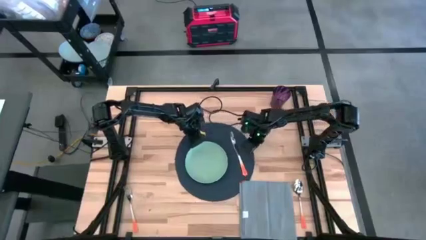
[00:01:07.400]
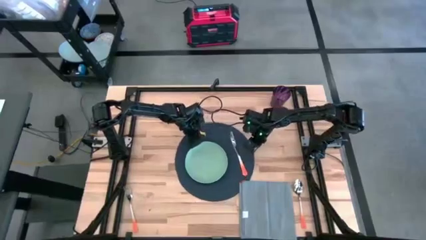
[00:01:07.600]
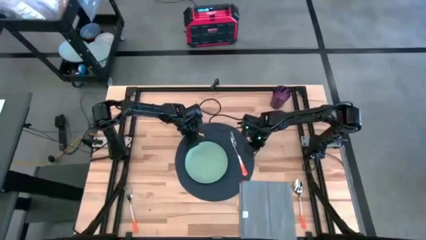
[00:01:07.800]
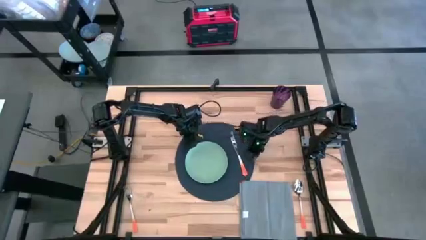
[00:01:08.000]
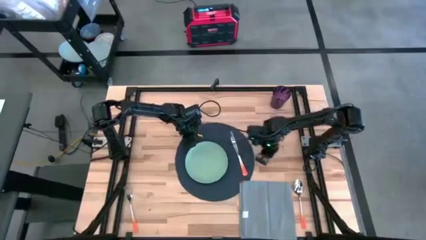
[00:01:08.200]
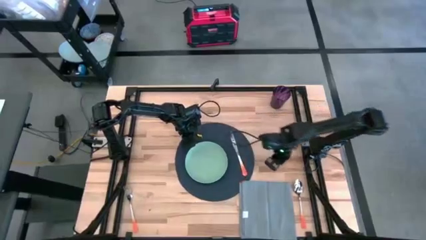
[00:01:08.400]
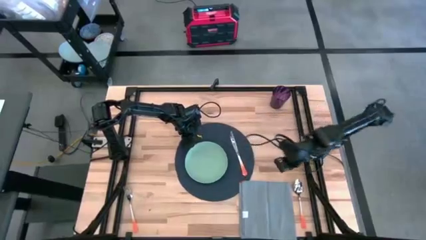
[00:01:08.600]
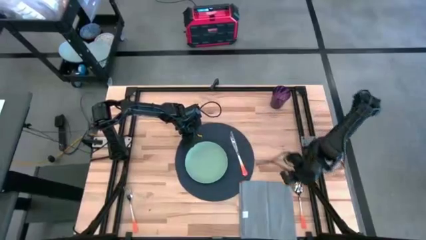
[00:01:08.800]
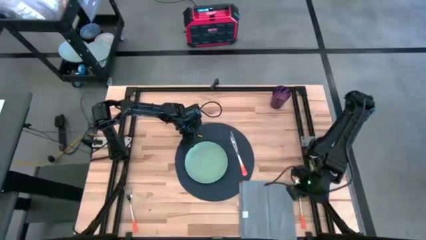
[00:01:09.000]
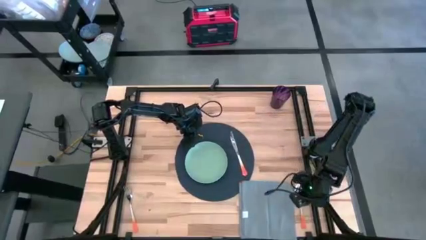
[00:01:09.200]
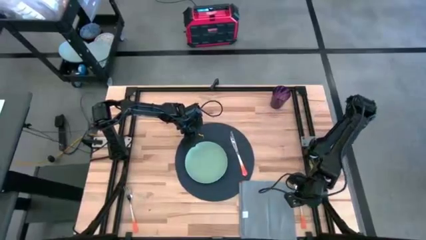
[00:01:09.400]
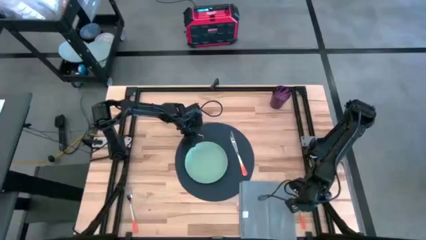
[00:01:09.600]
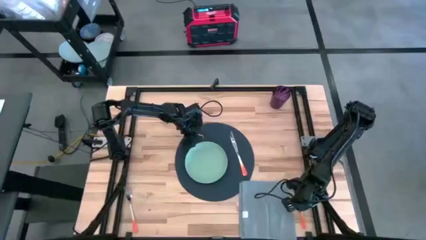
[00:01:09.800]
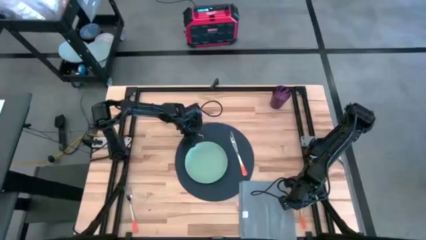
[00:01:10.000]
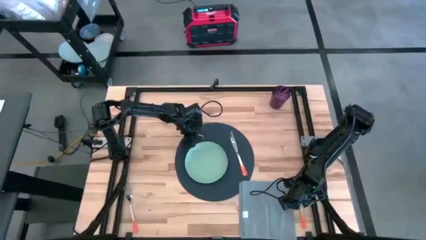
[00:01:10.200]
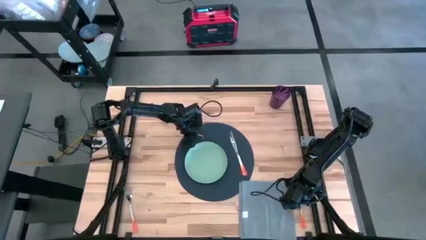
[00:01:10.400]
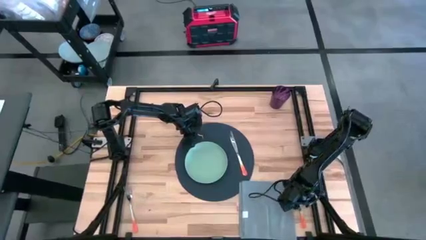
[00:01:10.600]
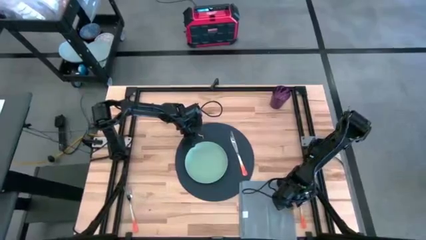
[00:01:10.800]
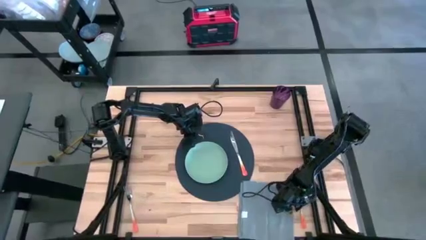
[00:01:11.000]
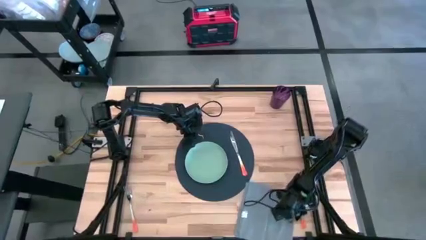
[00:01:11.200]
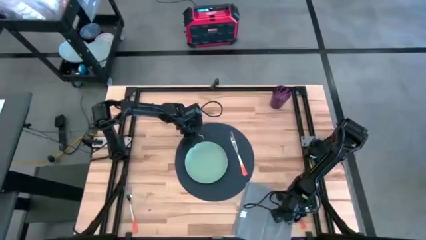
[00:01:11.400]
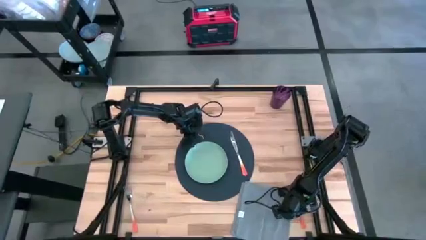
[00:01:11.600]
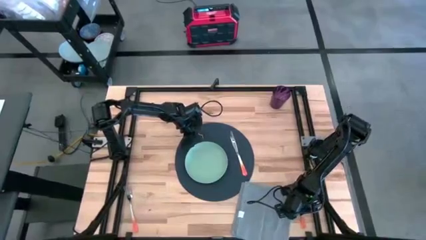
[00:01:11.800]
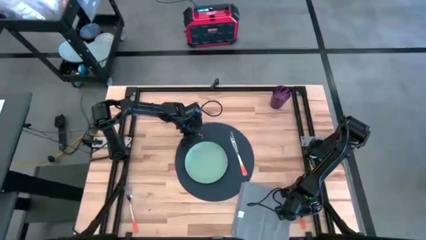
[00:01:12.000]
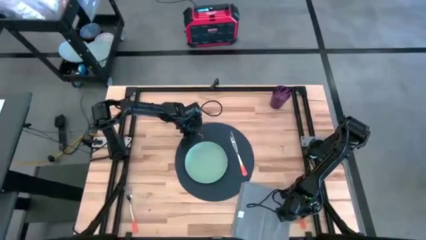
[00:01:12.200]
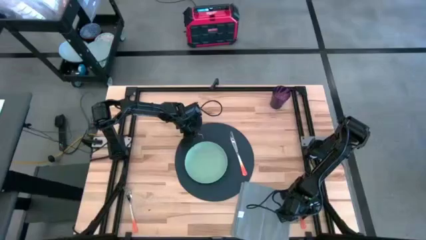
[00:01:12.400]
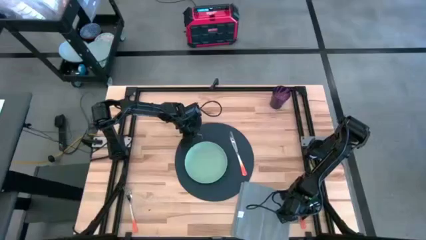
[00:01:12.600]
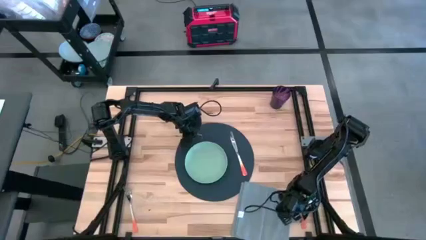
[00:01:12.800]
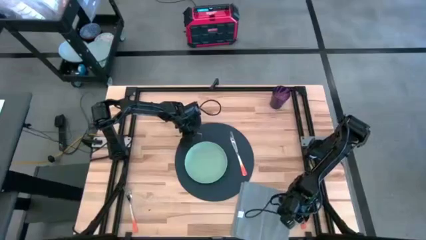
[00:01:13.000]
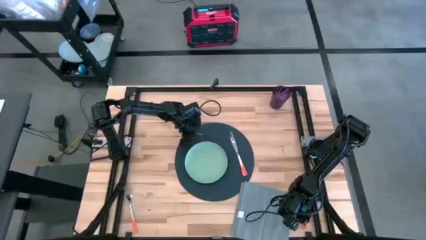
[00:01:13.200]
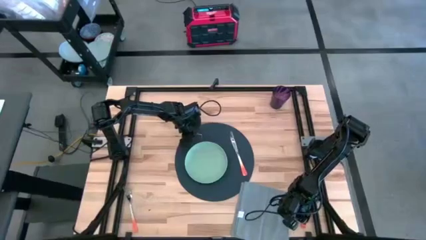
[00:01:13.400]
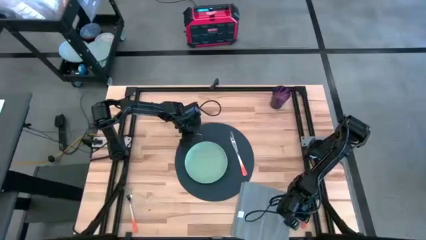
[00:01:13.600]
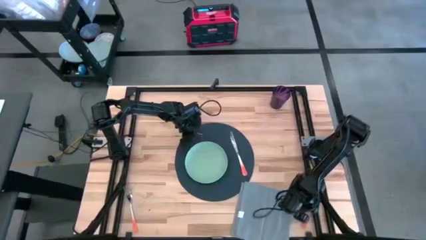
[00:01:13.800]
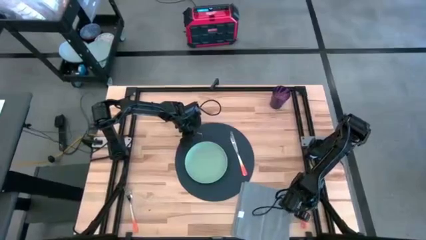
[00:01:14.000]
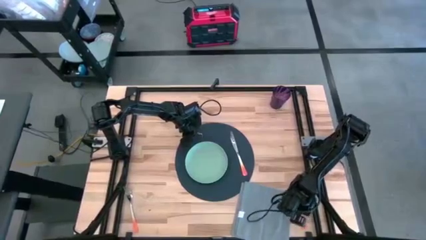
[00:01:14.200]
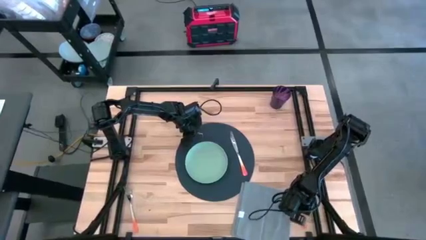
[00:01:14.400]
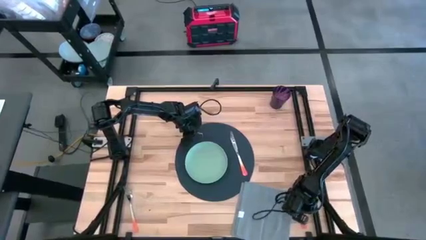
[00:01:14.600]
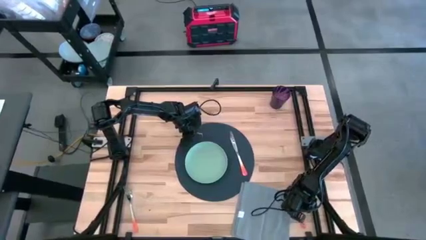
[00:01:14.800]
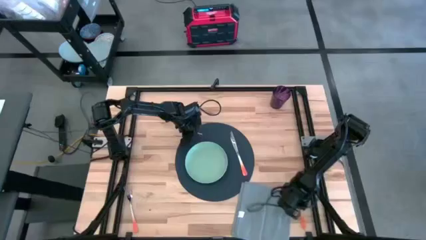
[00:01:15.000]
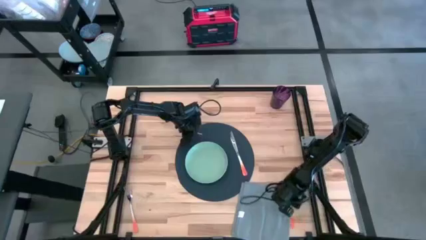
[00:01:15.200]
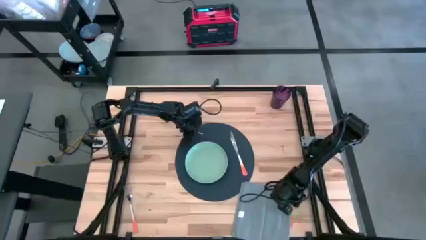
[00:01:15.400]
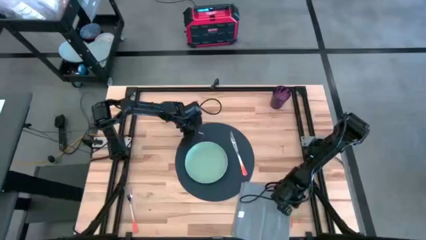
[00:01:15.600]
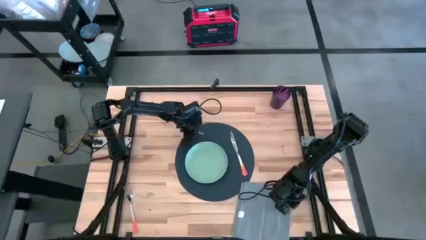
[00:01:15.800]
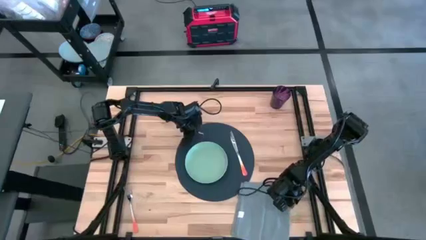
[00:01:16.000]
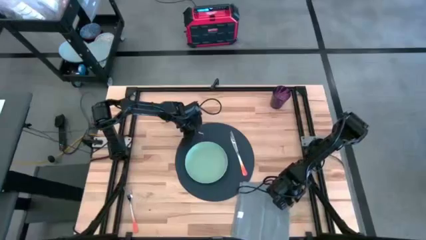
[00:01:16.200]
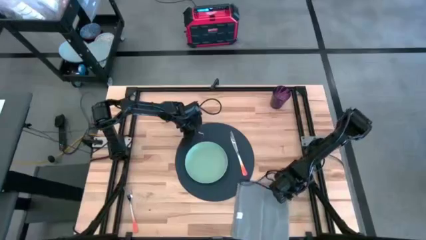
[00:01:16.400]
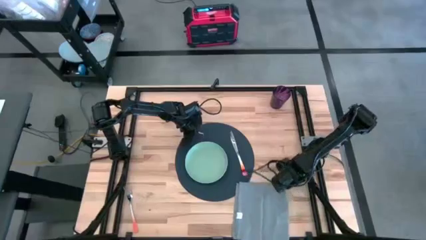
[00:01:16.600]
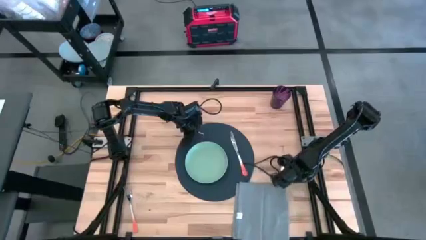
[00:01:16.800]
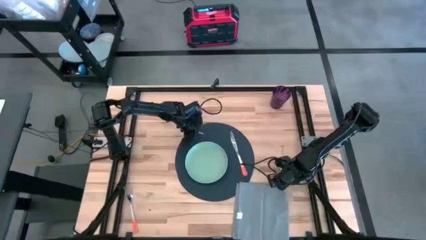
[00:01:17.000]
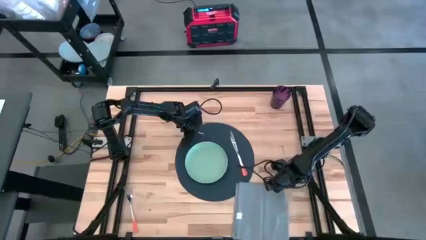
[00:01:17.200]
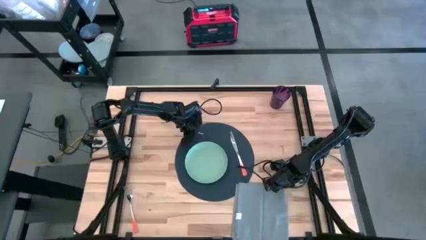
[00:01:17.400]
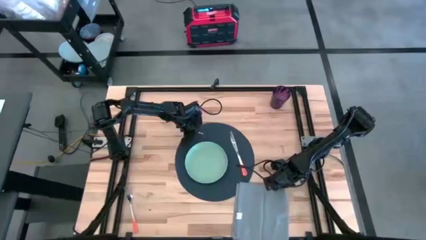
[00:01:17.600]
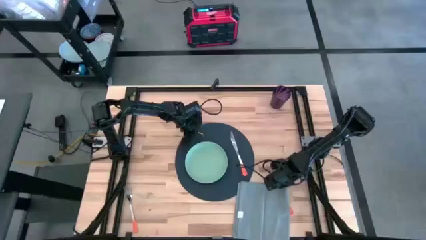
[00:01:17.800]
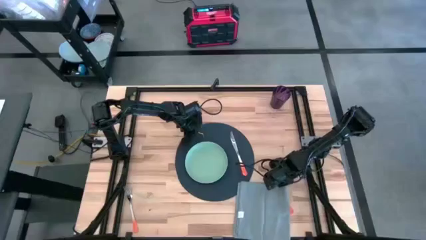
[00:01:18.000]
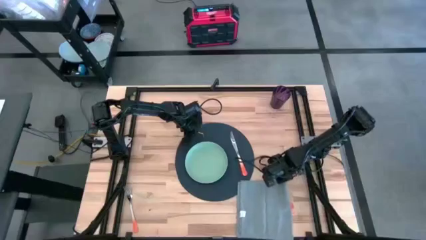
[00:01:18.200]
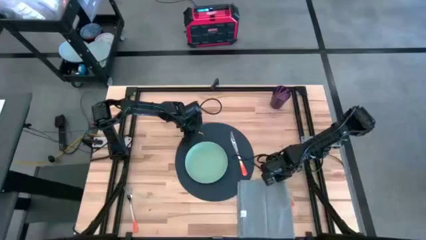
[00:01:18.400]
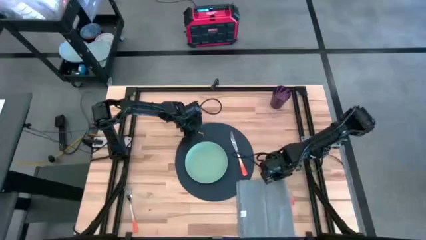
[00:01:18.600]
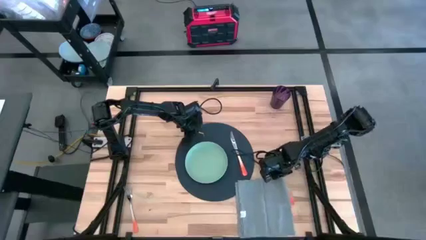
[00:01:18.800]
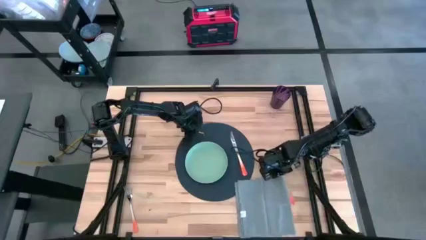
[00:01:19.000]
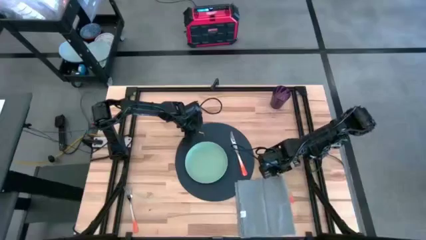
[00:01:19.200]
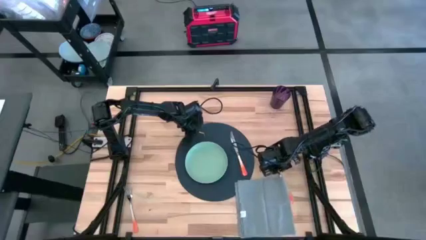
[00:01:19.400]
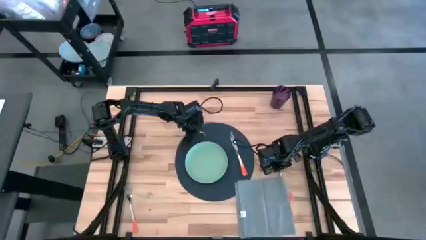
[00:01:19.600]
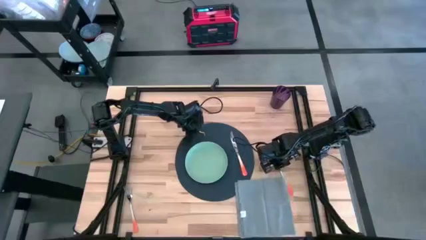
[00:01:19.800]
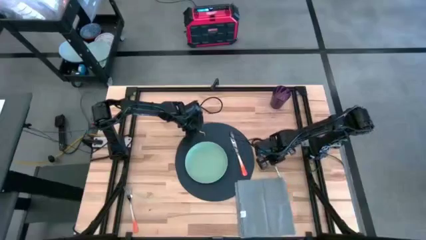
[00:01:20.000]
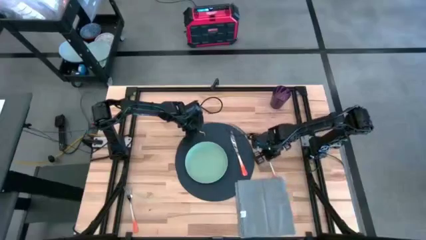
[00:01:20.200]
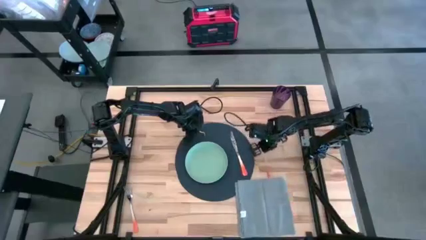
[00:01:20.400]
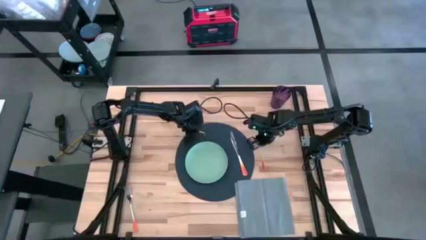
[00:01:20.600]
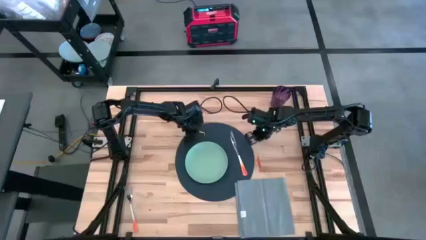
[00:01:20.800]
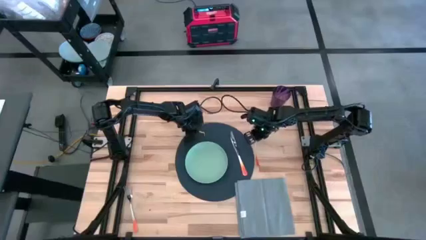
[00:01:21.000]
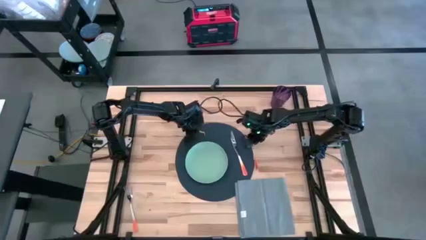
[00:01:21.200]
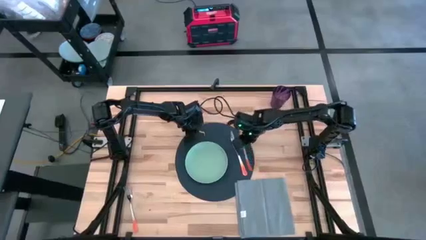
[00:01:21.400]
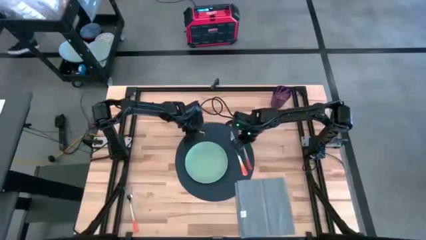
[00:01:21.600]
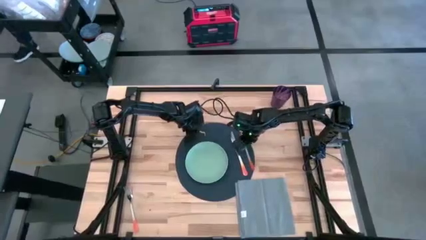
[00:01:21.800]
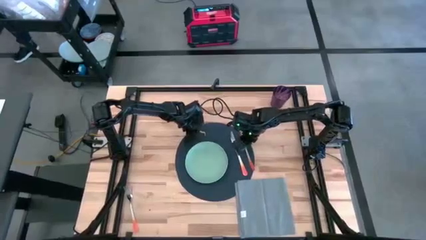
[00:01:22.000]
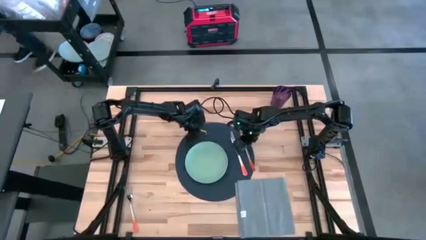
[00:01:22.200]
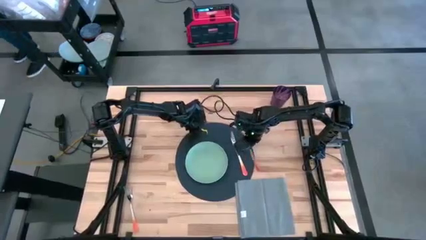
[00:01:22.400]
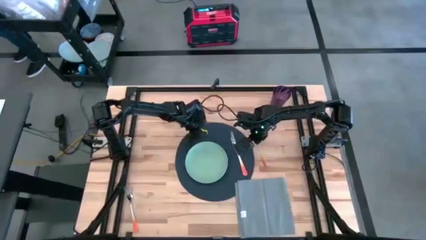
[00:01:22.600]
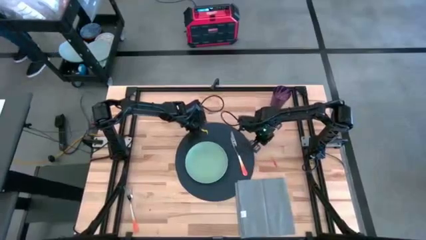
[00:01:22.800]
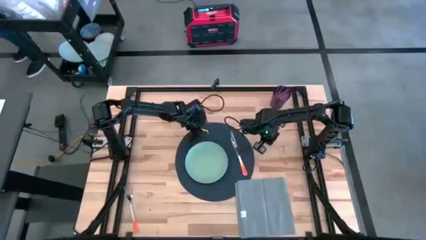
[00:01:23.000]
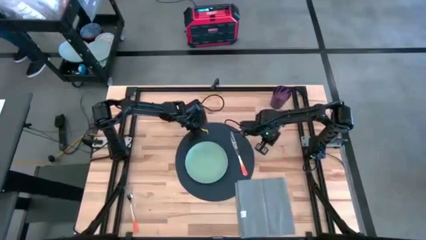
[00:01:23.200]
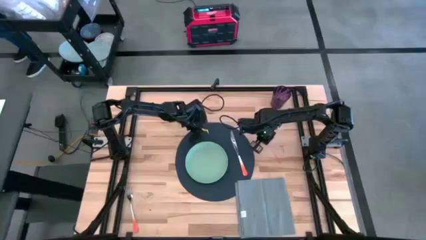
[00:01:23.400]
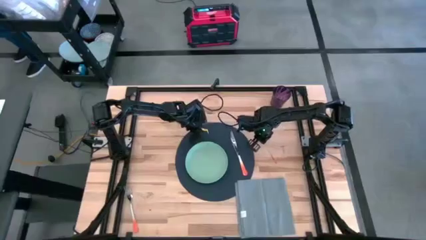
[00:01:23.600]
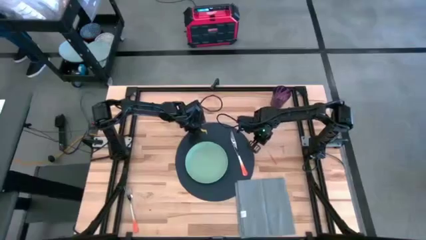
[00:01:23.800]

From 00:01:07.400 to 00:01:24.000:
Task: Set table place
Put the orange spoon on the blue placemat to the right of the orange fork
